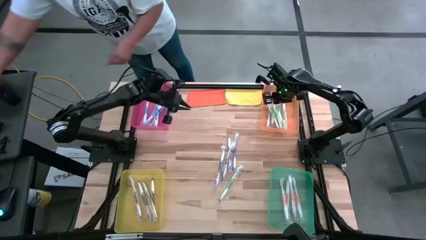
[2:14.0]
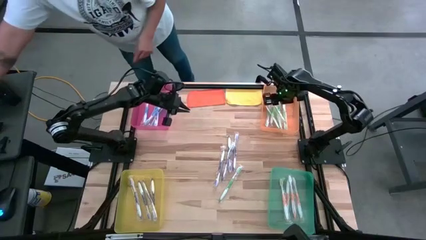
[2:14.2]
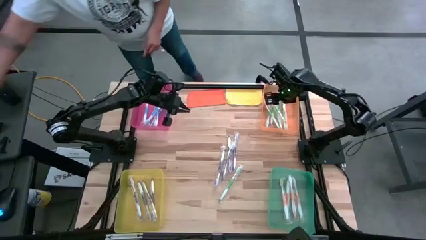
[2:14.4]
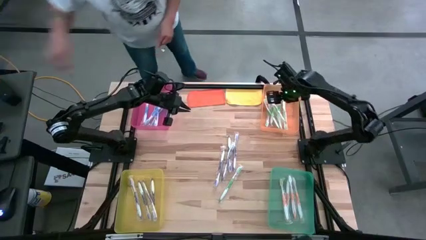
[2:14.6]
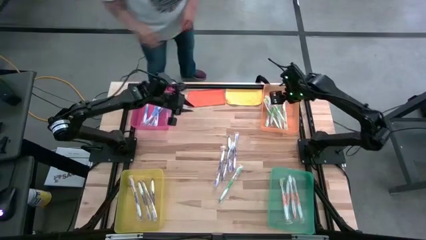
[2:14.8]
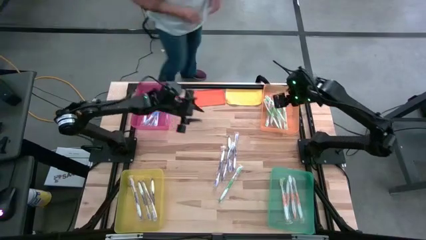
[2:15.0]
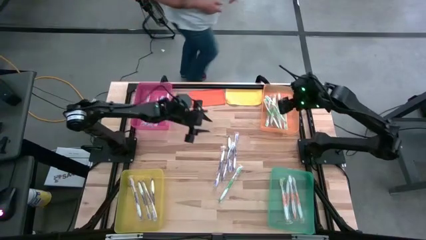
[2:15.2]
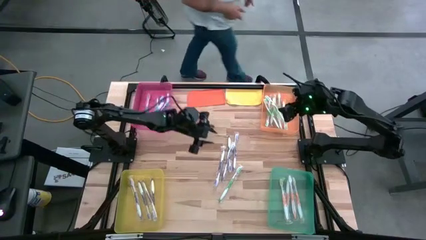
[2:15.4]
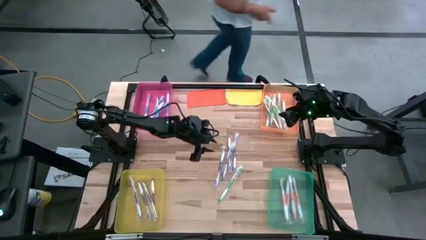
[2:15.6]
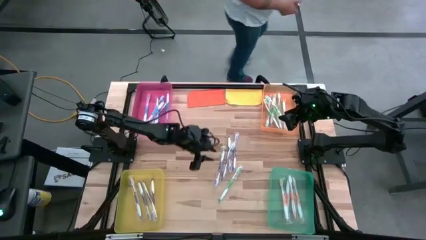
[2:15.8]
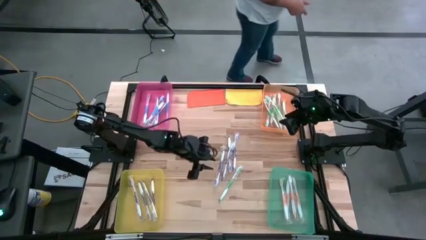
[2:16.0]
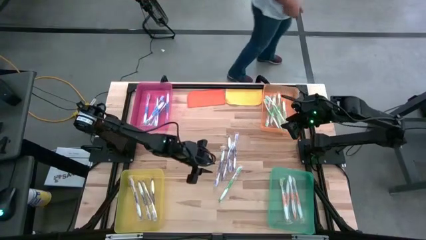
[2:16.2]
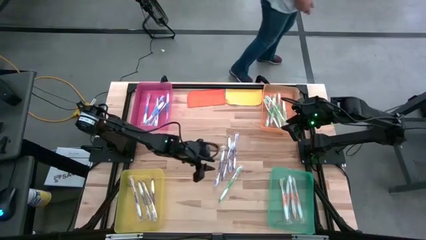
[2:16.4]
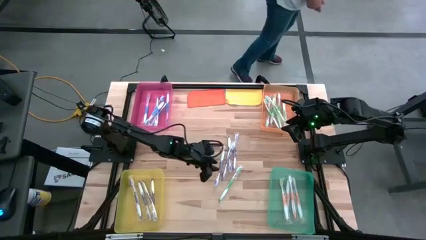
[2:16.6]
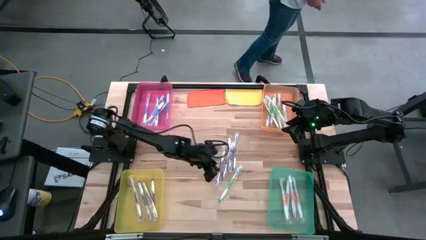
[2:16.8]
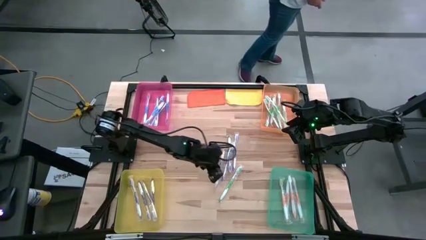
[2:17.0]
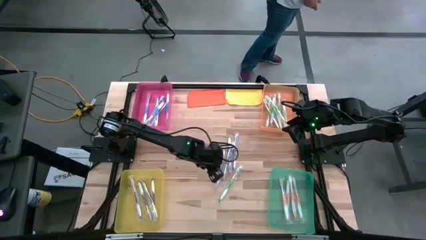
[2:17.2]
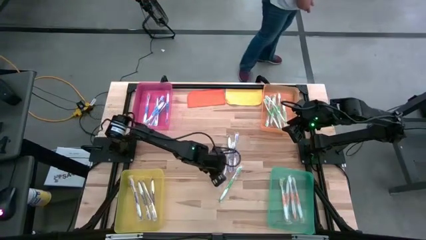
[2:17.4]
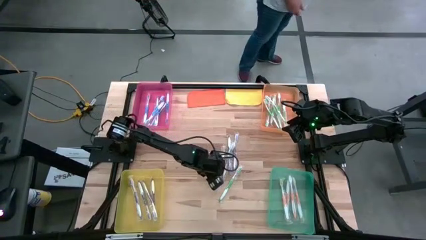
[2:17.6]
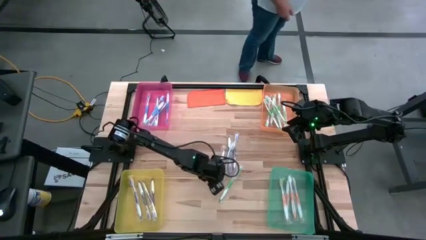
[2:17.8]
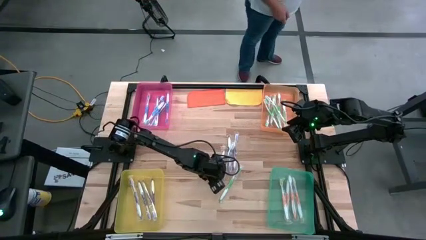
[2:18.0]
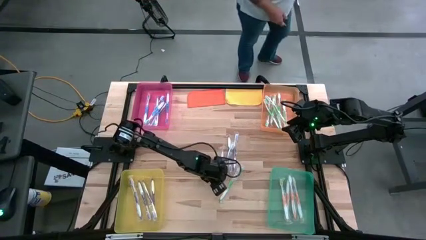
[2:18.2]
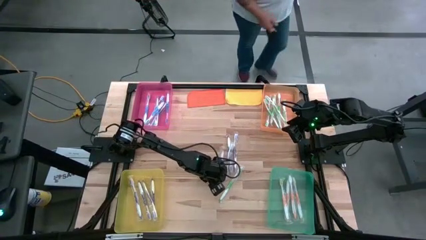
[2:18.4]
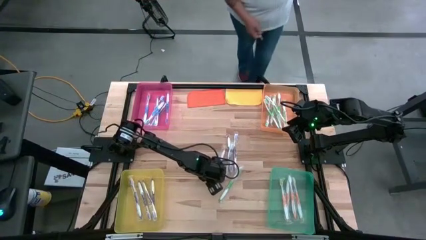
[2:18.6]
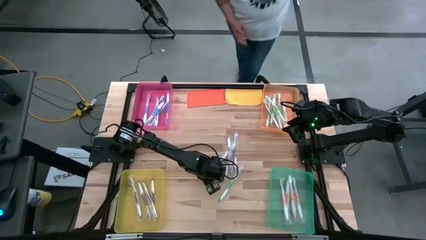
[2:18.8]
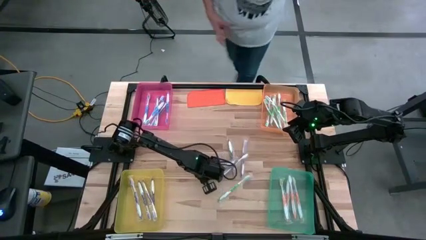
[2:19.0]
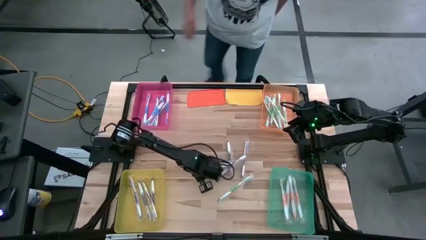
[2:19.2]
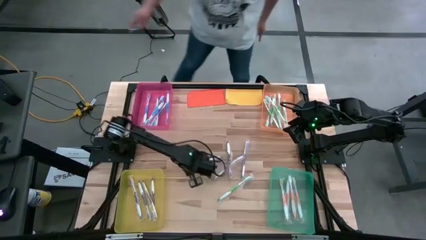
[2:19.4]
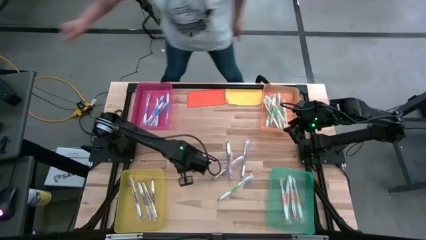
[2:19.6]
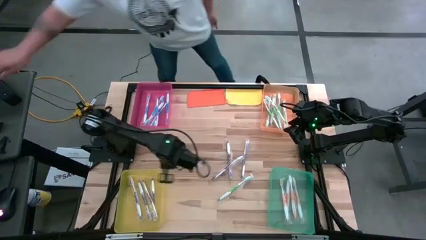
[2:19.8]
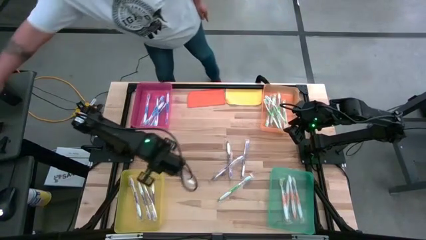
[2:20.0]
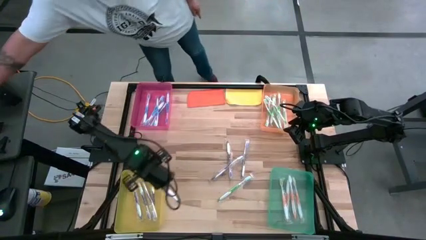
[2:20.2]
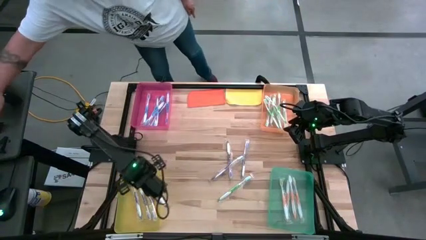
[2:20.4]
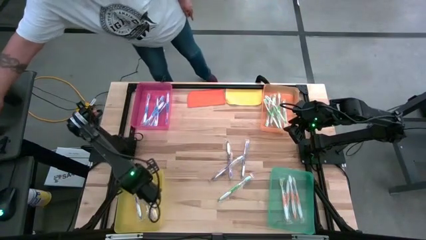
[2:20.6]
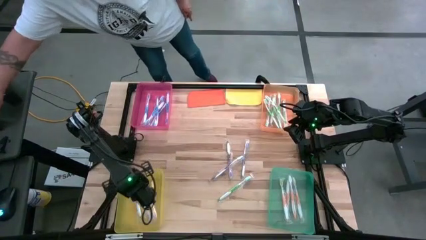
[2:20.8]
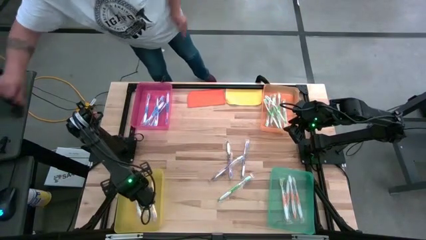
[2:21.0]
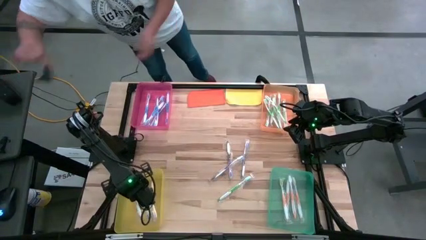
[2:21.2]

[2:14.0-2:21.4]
Task: Pick & Place Toothbrushes
Put the purple toothbrush into the yellow bin

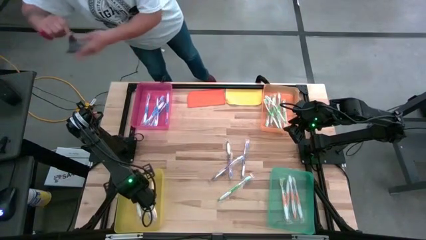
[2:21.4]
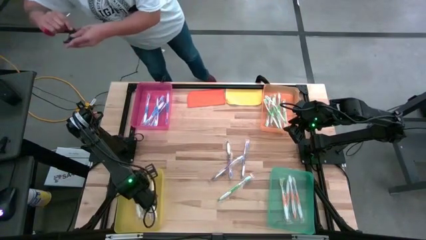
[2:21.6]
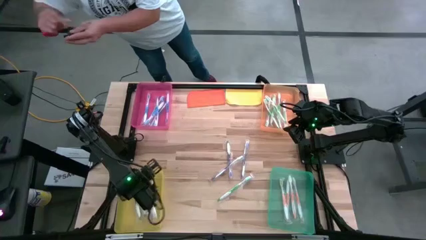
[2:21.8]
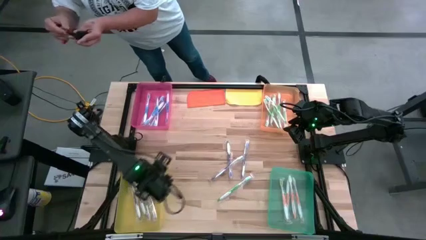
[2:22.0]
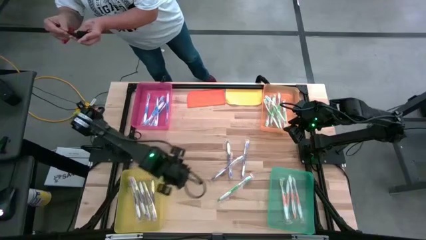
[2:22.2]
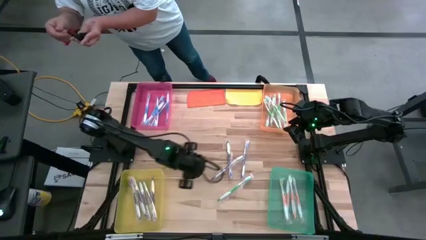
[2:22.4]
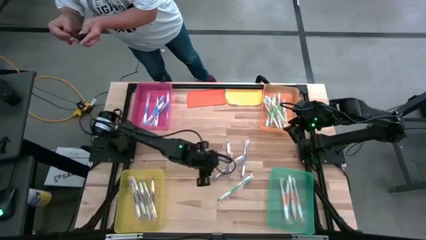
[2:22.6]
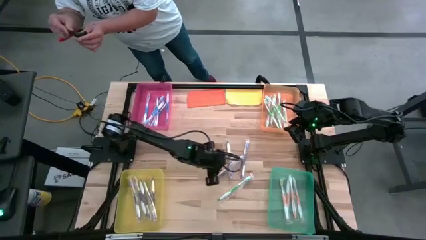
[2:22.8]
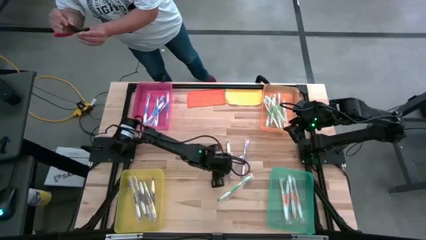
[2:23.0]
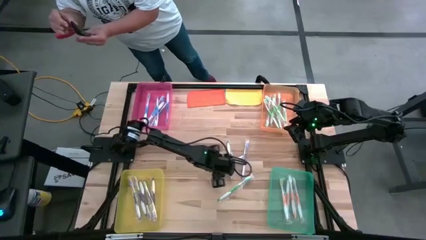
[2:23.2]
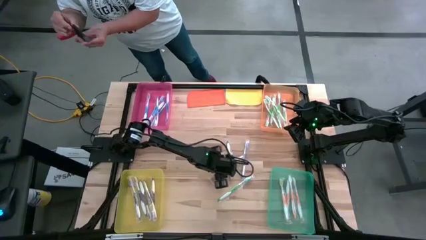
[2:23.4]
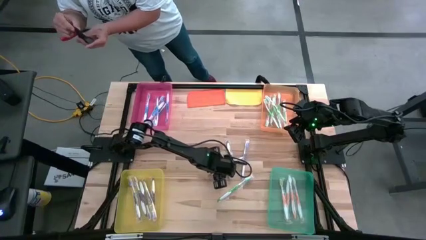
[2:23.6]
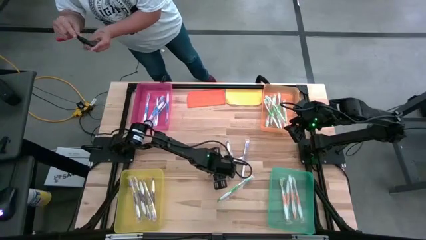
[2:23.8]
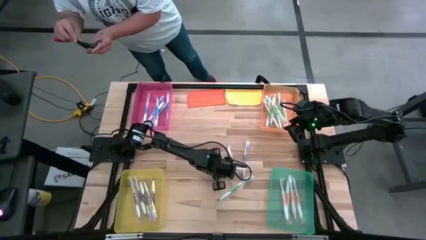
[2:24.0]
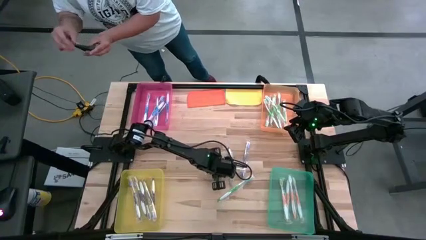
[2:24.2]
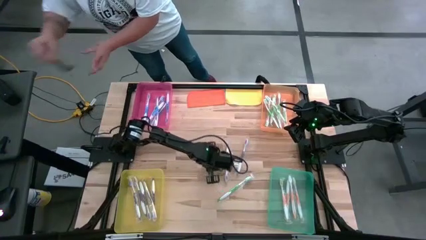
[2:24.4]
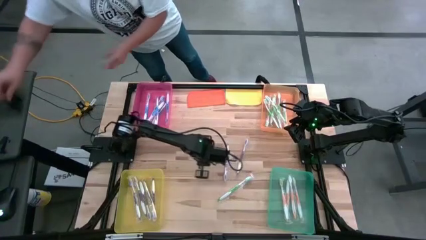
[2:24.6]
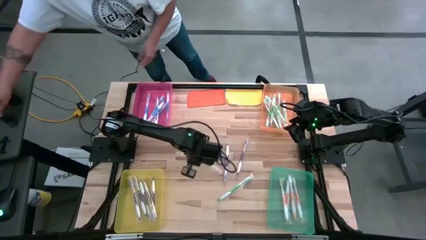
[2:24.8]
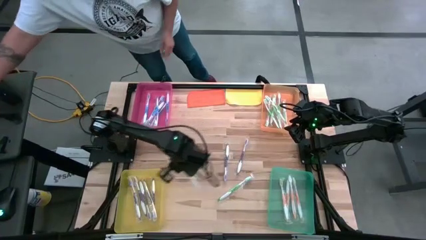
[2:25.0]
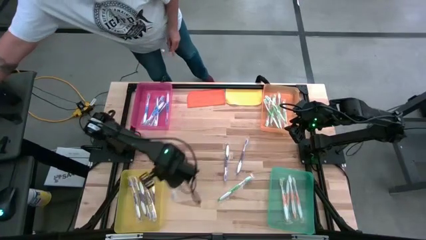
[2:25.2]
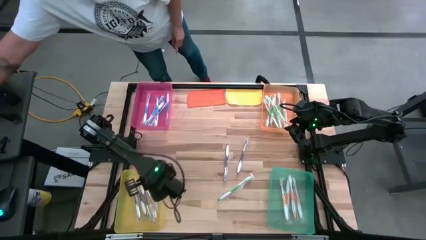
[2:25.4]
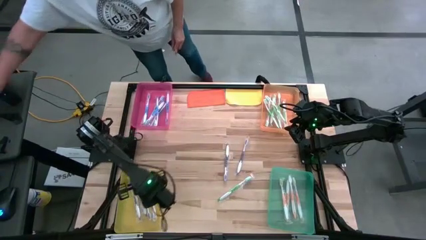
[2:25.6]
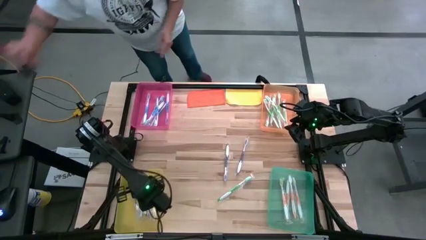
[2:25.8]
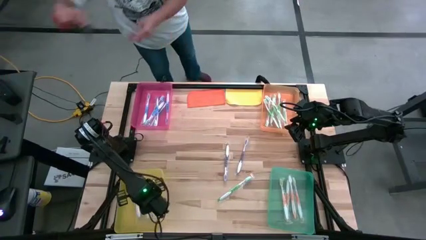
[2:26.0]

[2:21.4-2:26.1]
Put the purple toothbrush into the yellow bin

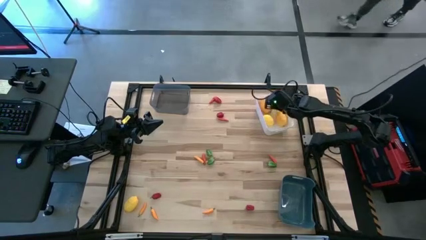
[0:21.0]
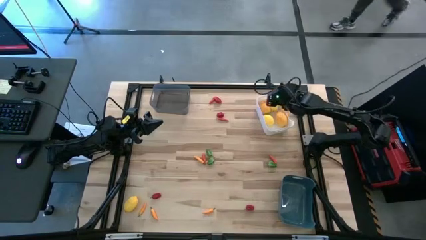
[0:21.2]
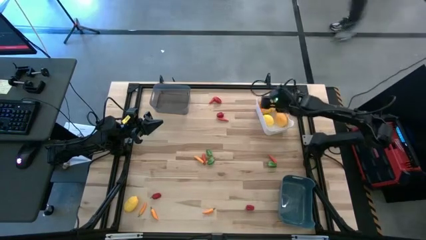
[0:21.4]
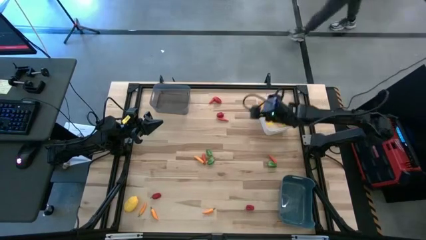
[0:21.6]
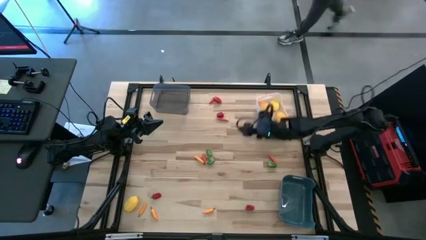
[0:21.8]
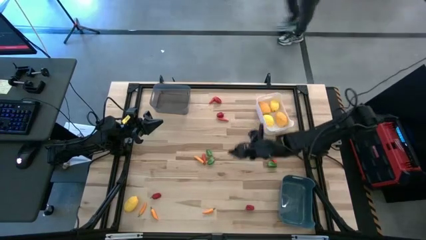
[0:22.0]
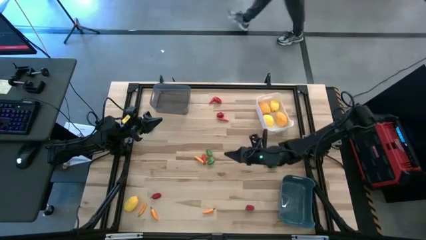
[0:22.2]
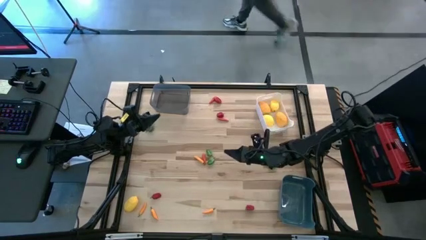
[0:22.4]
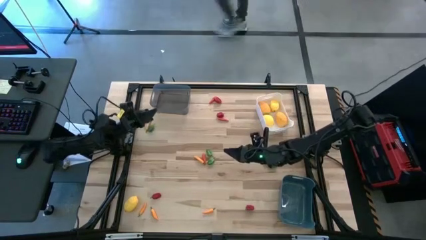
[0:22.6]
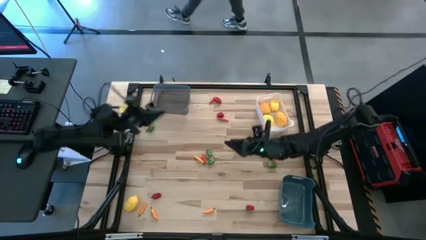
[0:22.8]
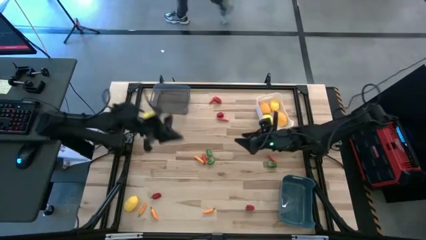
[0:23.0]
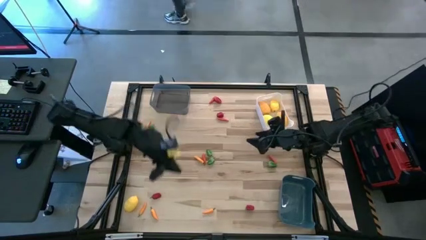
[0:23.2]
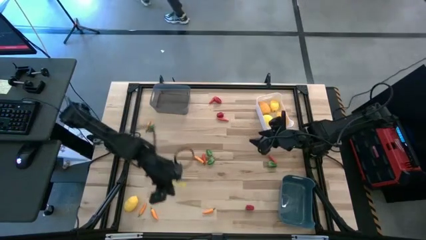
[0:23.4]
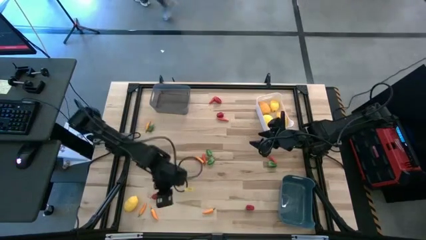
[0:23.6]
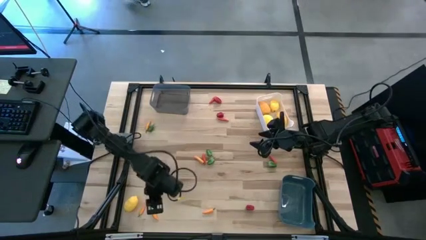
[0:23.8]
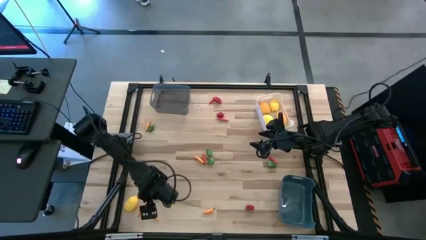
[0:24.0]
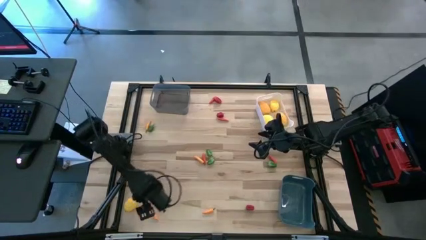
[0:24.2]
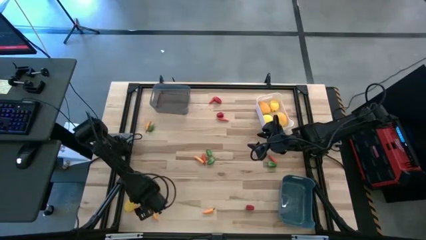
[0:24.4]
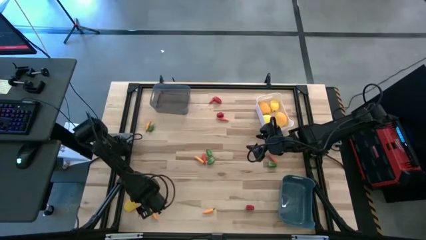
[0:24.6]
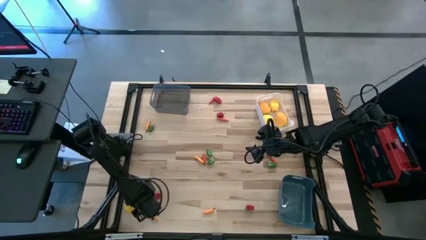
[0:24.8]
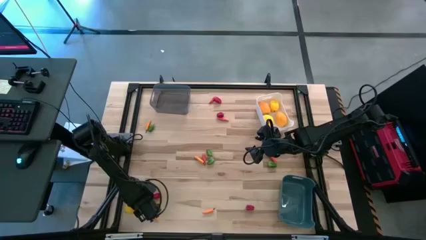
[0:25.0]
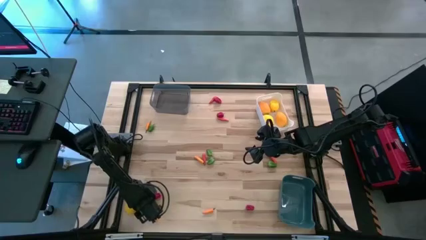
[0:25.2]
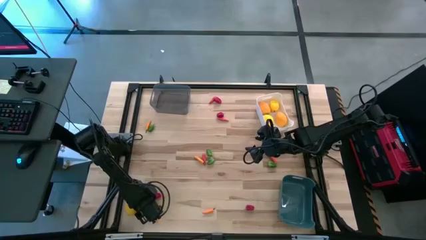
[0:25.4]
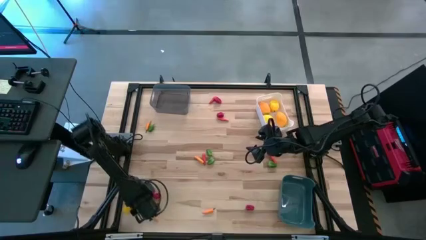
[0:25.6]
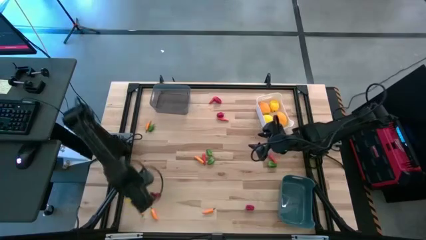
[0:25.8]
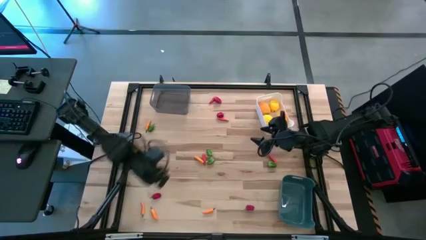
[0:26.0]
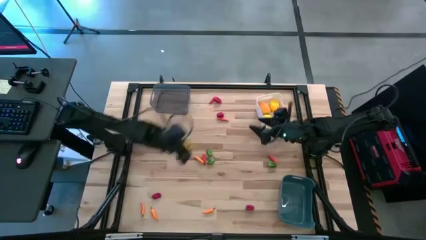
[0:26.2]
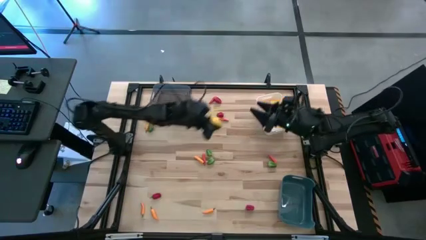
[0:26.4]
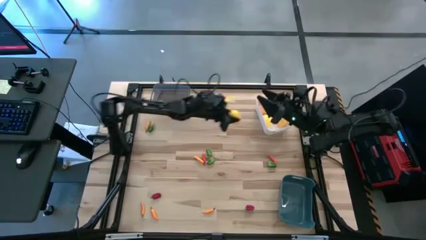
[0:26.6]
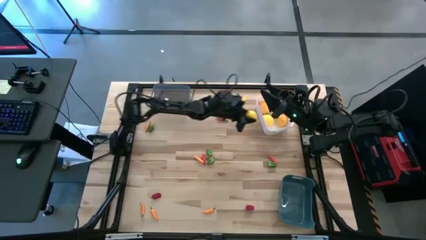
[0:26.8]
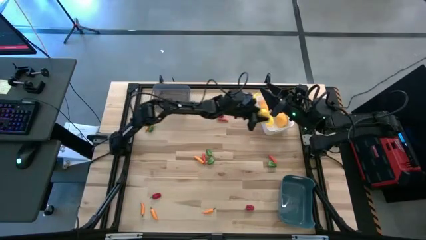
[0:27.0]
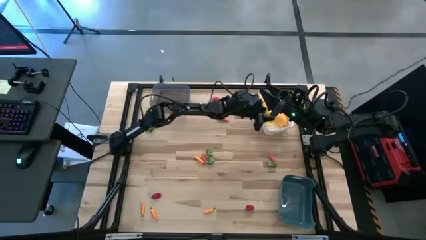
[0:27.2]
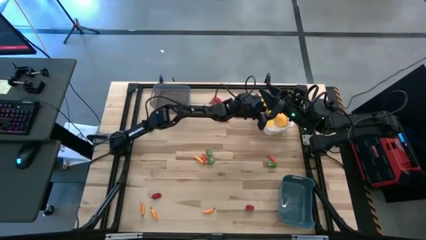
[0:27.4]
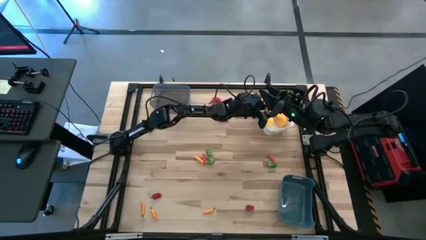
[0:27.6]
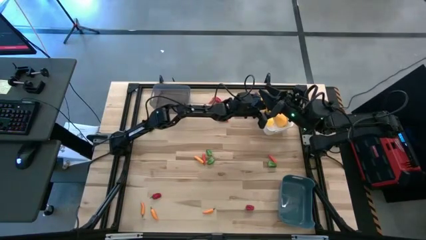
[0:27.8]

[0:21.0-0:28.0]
Task: Sort produce into baskets
Put the lemon into the white bin
